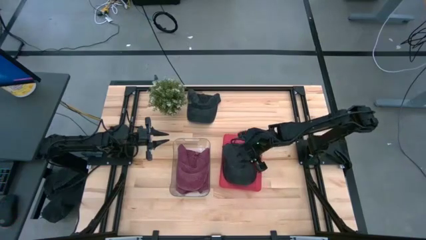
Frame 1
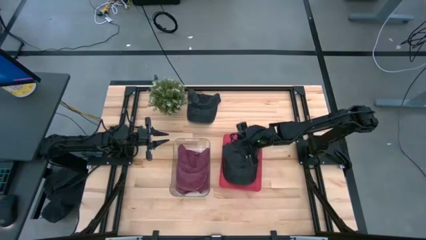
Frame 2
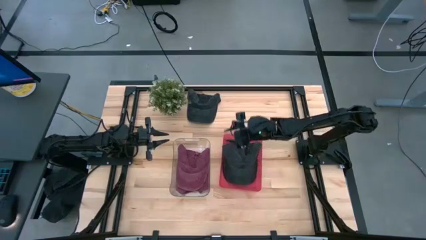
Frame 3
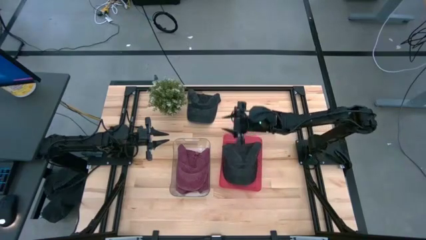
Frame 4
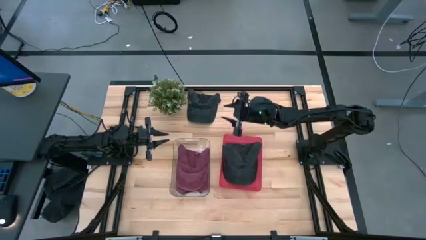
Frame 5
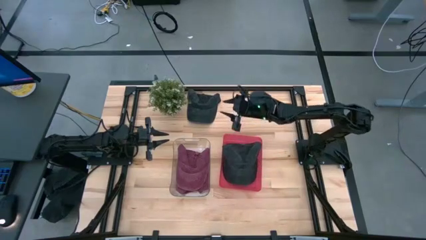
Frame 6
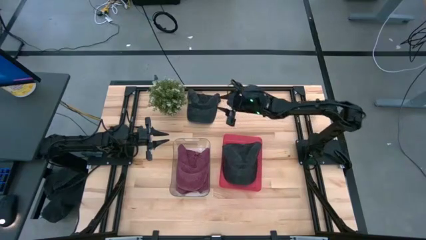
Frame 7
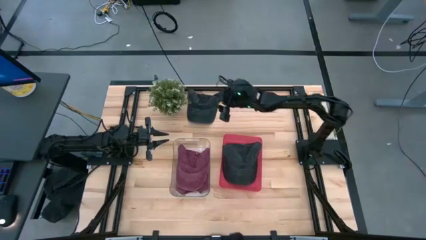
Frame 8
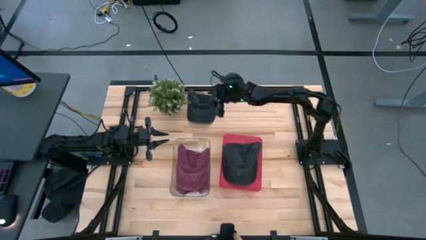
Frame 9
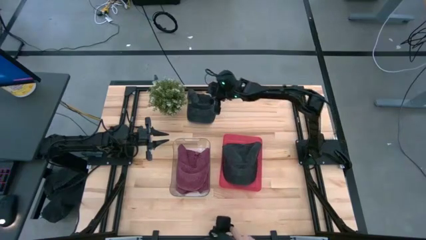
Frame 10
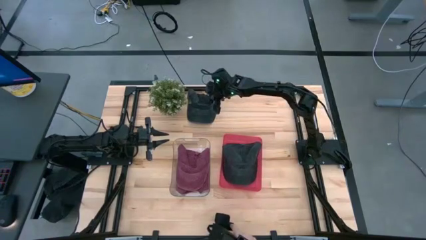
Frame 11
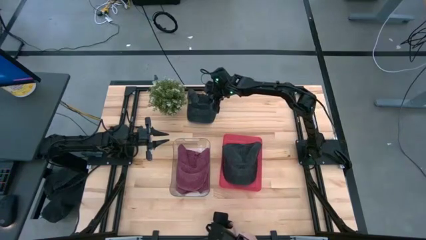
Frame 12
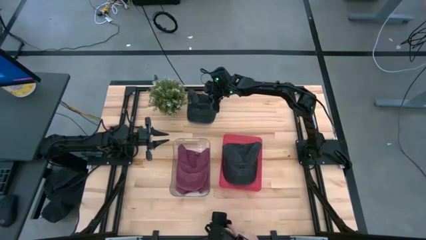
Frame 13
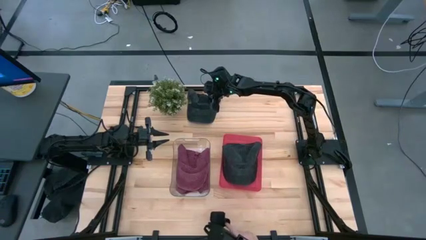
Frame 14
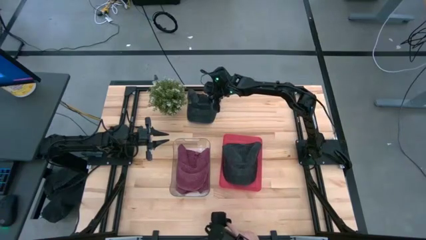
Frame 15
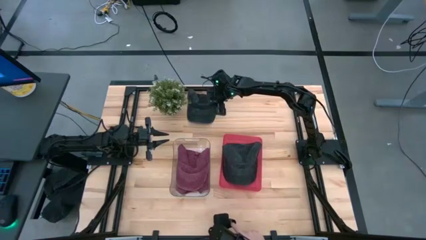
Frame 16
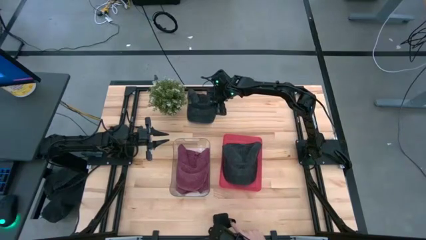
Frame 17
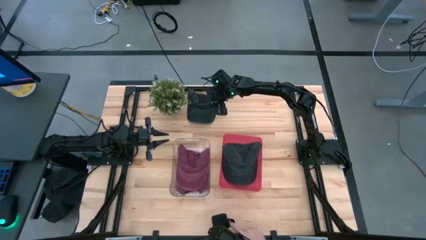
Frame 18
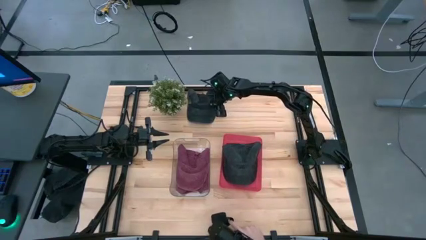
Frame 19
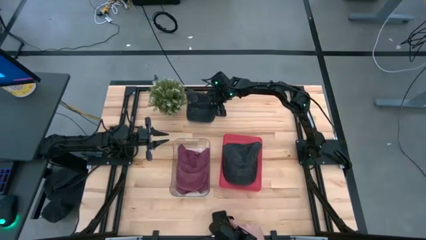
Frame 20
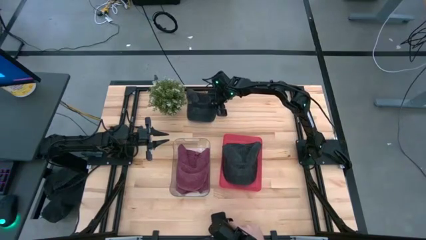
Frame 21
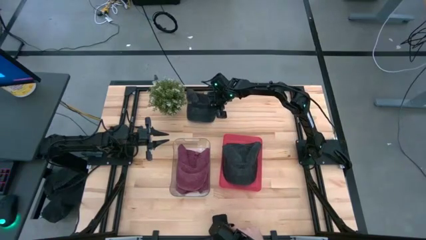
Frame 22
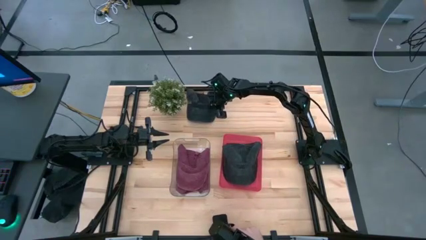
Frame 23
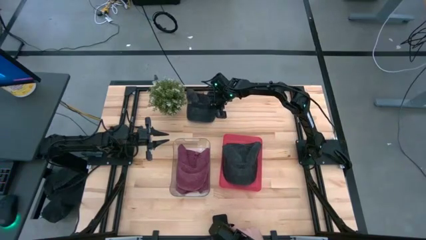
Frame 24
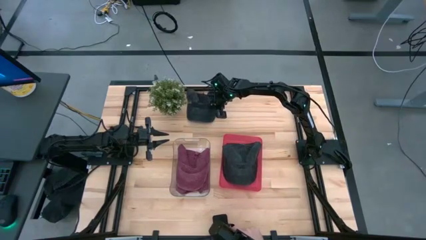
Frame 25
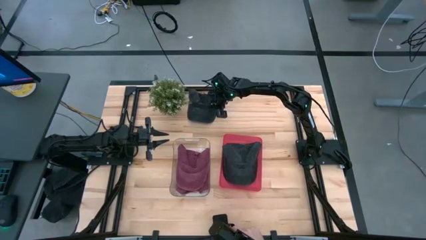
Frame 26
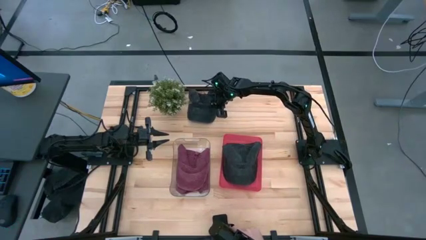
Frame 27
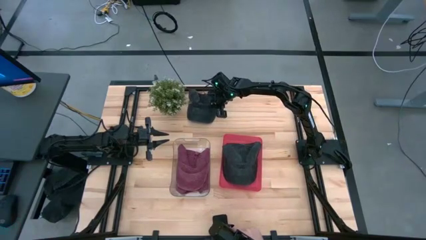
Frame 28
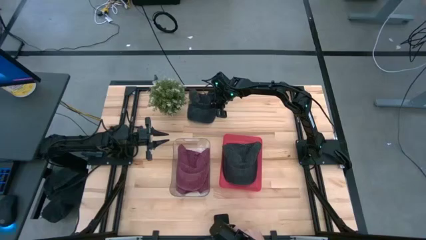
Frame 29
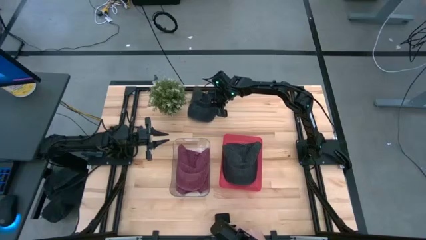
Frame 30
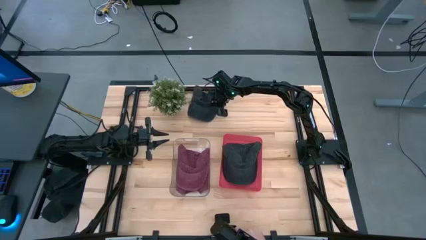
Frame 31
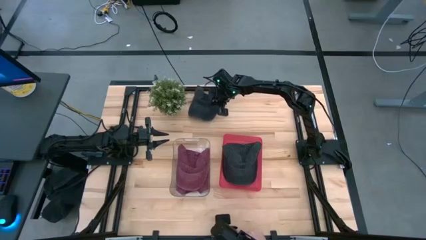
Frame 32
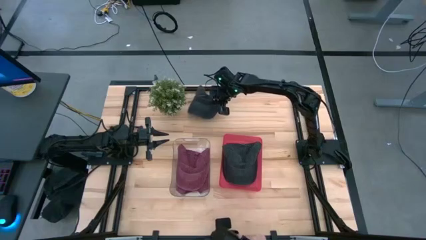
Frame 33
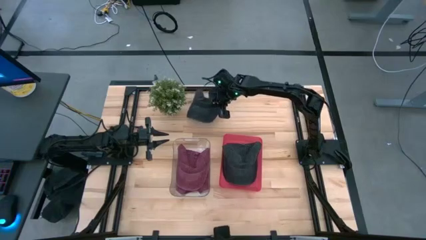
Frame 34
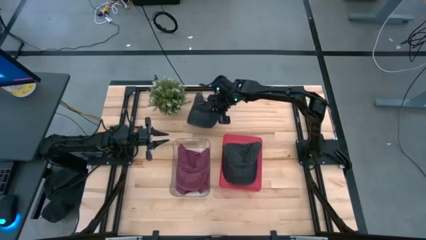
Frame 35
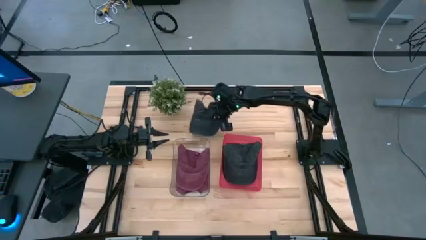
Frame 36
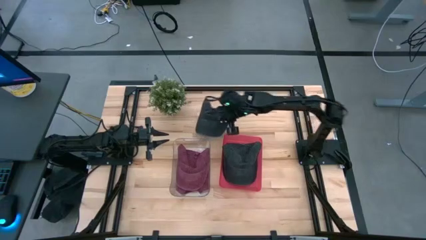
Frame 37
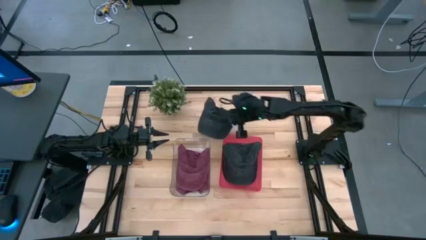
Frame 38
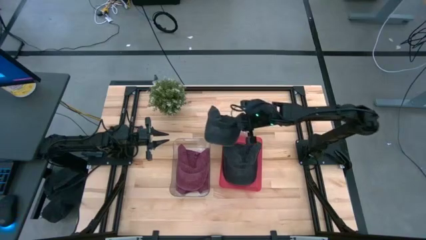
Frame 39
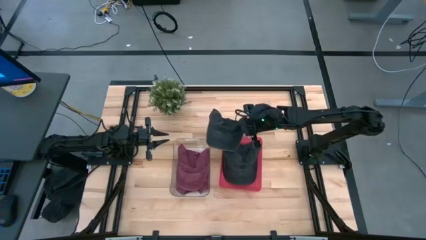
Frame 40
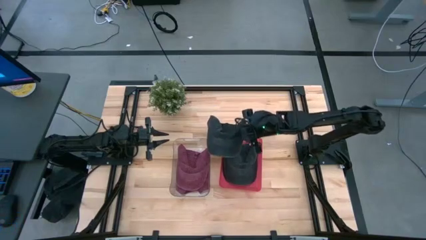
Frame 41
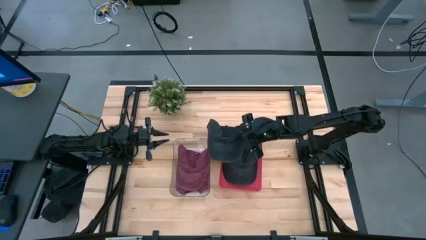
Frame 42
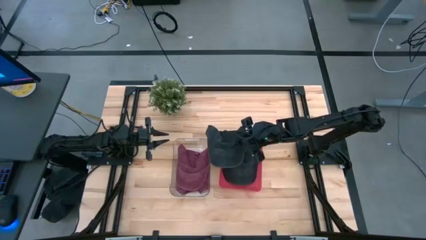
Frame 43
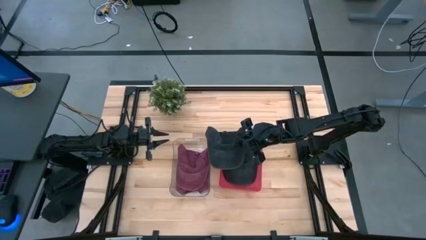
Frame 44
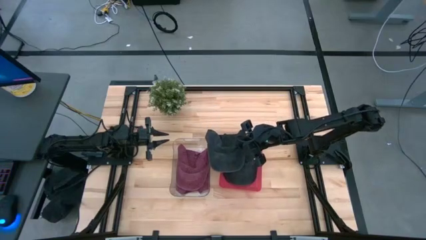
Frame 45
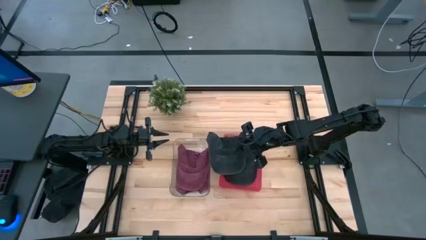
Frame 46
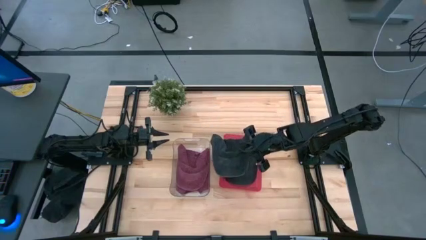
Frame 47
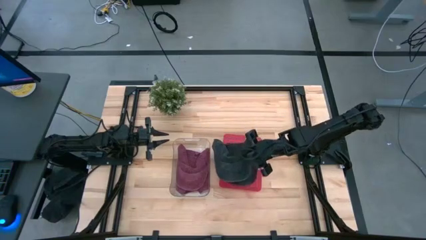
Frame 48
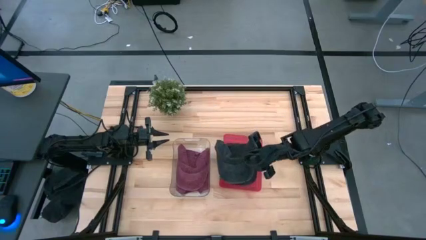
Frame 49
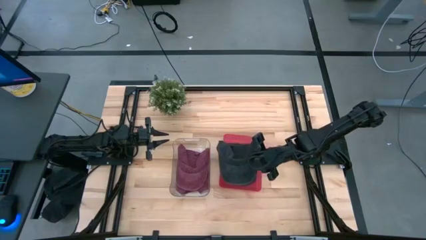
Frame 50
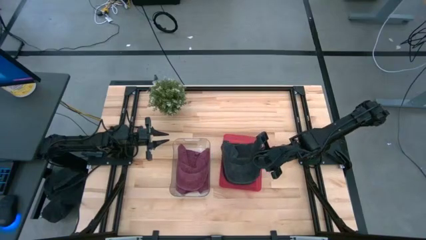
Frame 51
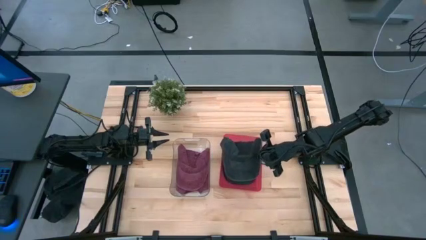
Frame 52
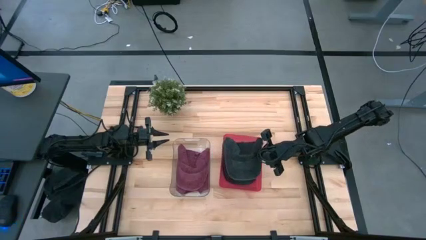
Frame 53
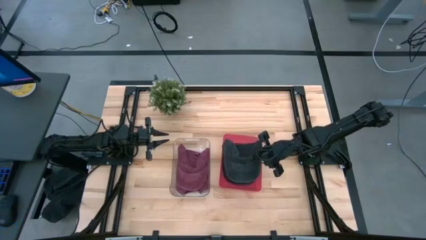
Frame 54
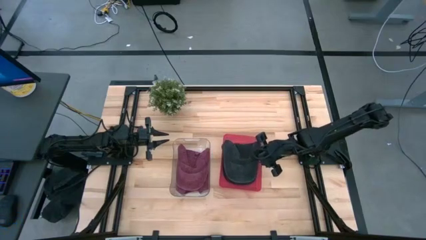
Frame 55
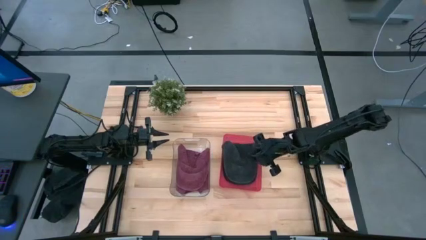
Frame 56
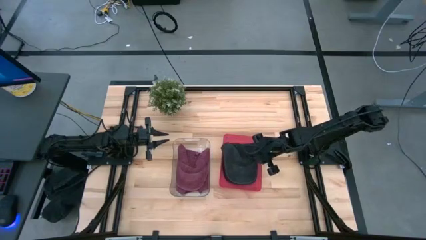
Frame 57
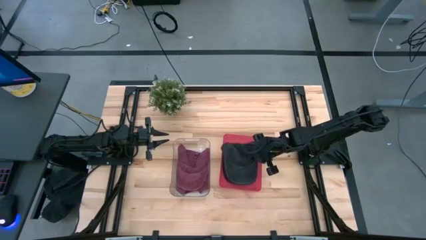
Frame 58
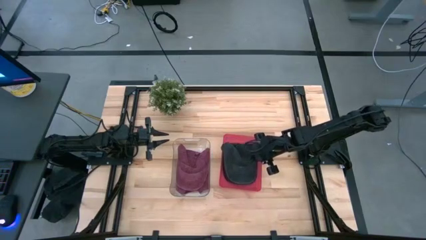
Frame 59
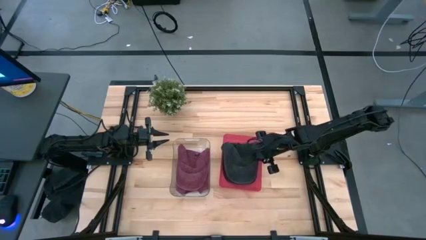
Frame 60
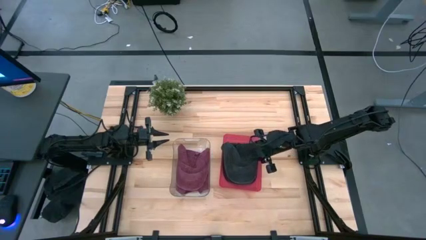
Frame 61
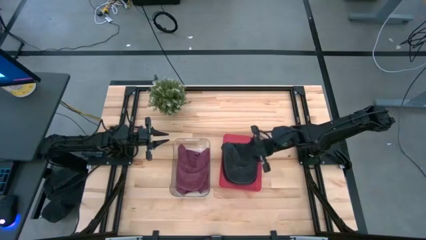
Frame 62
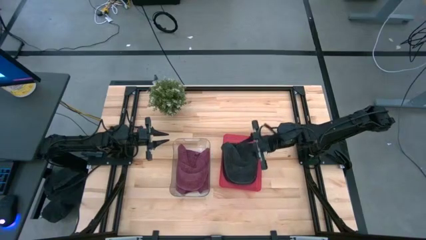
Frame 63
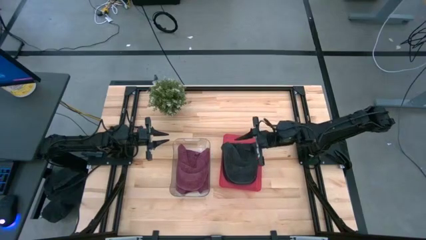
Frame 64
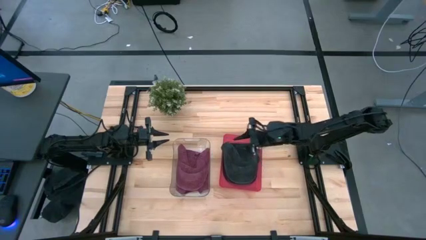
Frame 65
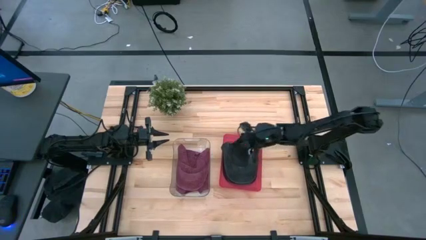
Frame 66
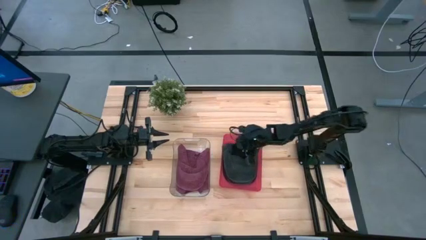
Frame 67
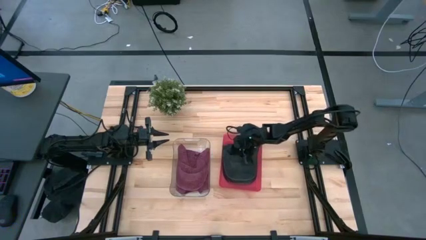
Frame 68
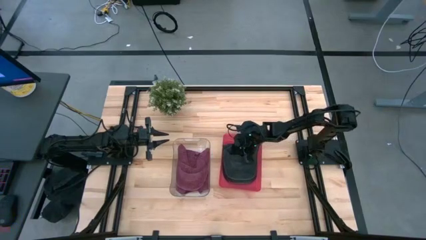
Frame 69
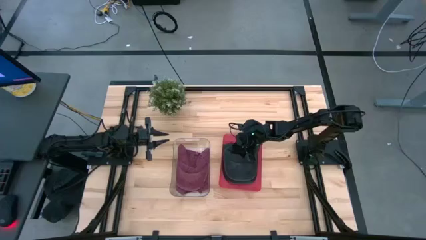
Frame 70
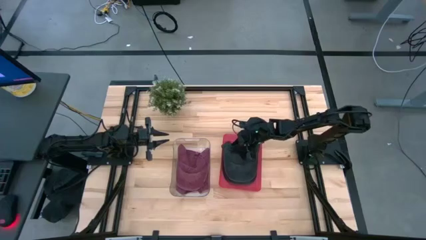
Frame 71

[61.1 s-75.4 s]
Task: Pick & Place hat
Put the black cap into the red bin
